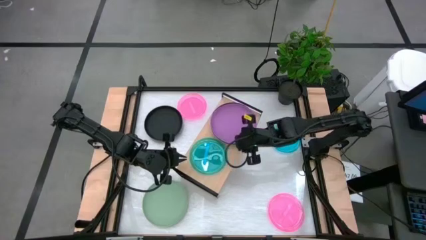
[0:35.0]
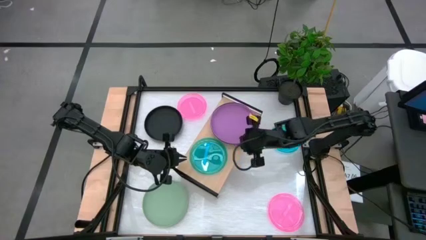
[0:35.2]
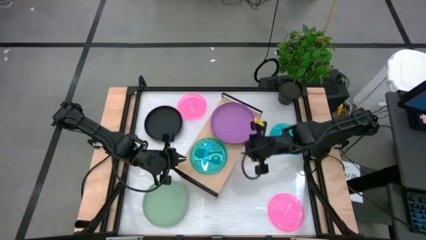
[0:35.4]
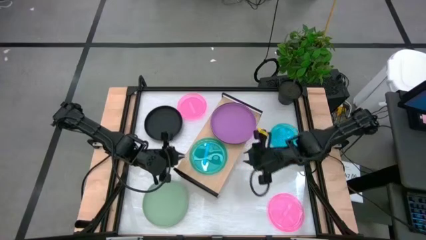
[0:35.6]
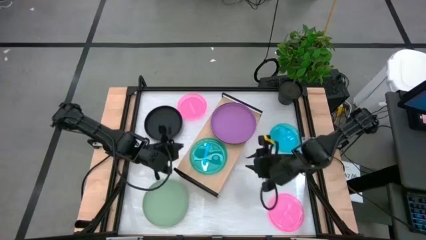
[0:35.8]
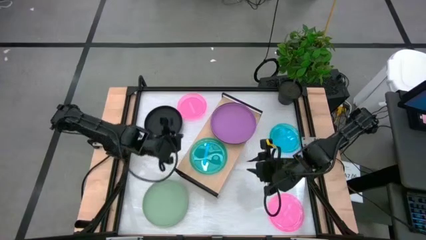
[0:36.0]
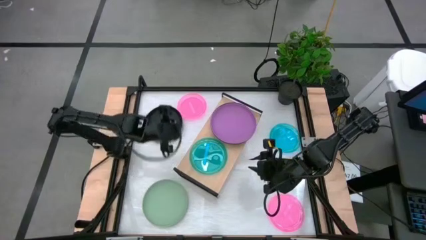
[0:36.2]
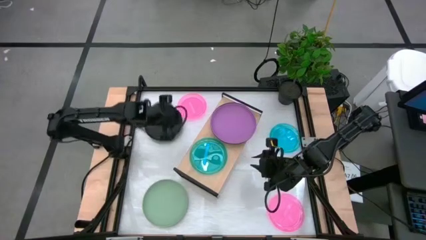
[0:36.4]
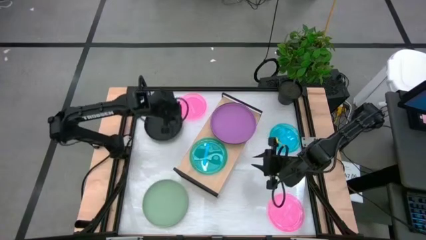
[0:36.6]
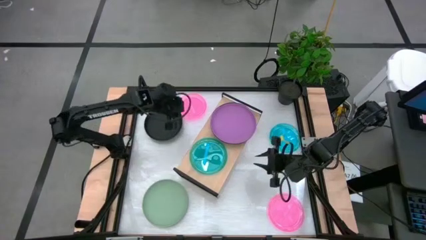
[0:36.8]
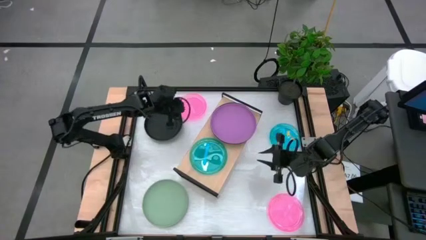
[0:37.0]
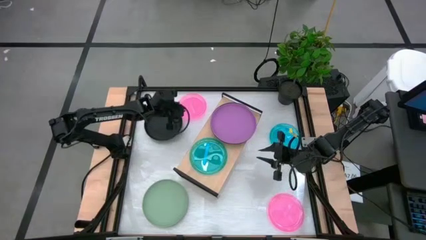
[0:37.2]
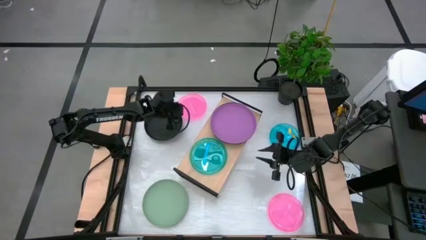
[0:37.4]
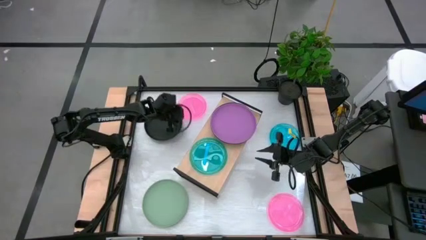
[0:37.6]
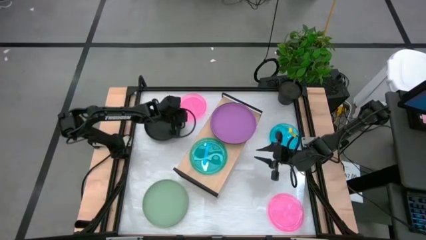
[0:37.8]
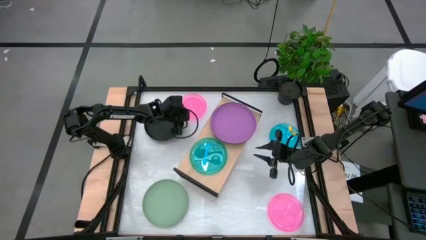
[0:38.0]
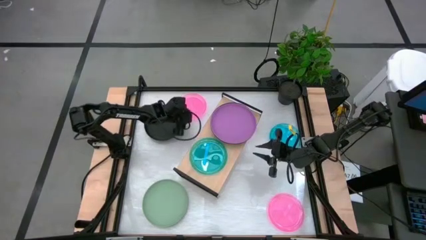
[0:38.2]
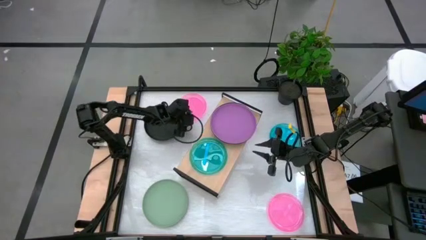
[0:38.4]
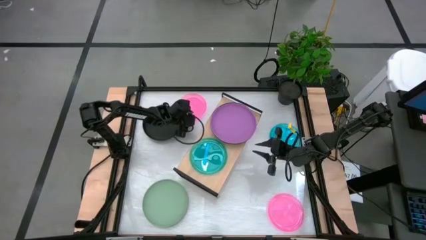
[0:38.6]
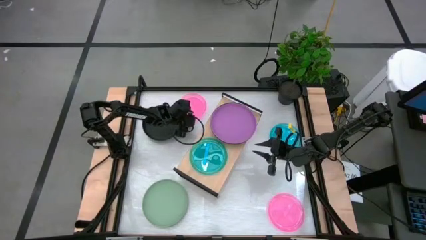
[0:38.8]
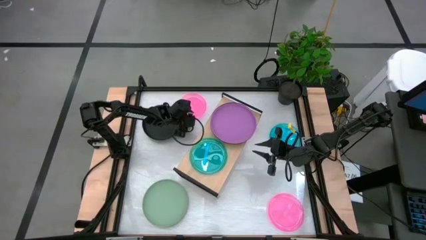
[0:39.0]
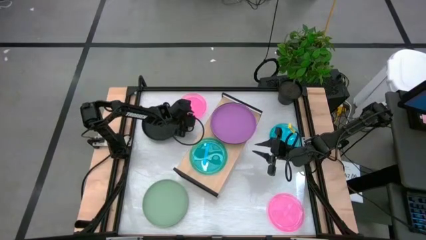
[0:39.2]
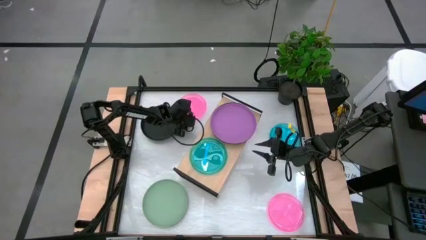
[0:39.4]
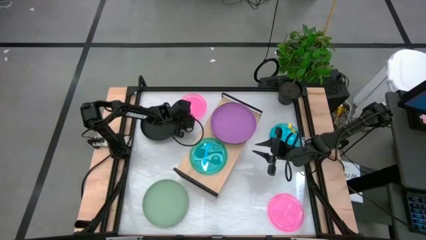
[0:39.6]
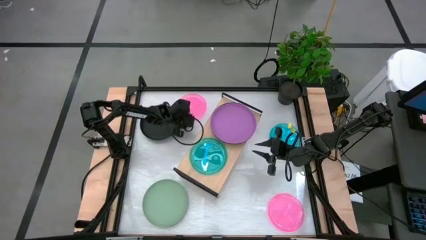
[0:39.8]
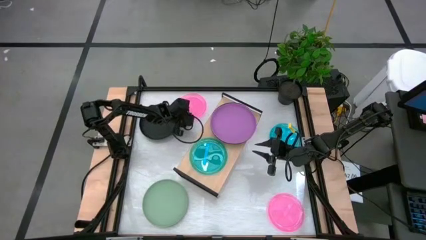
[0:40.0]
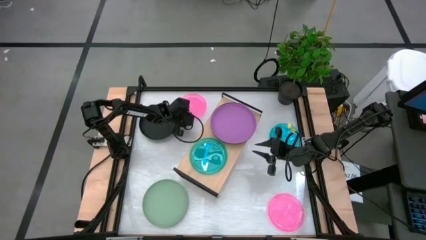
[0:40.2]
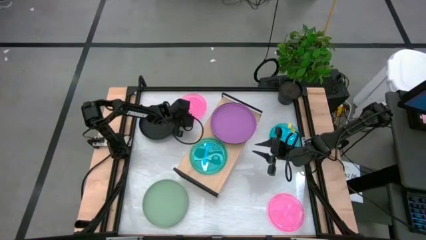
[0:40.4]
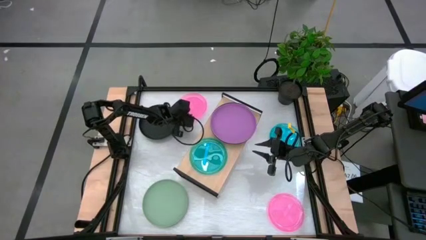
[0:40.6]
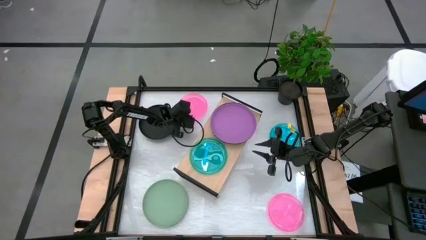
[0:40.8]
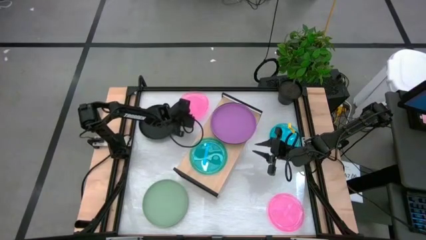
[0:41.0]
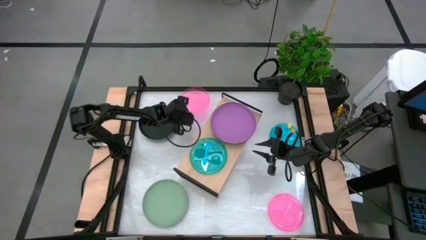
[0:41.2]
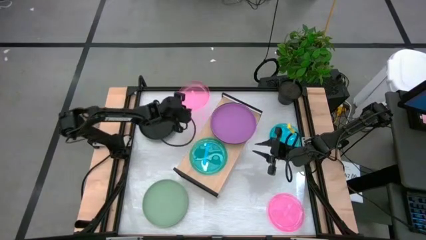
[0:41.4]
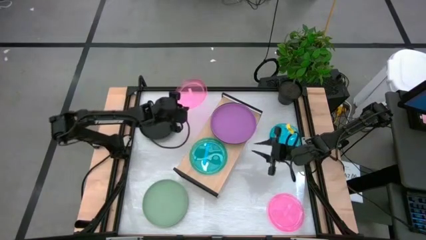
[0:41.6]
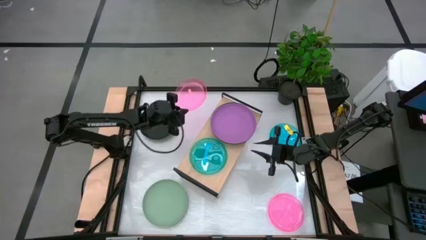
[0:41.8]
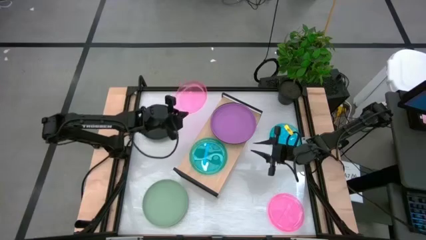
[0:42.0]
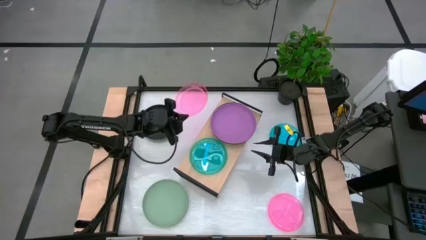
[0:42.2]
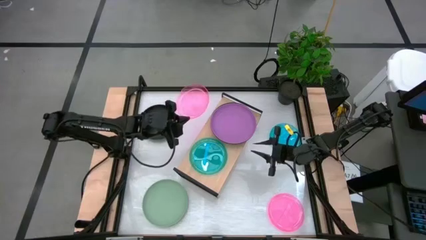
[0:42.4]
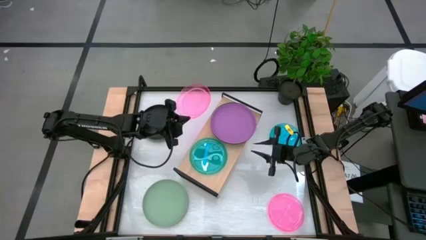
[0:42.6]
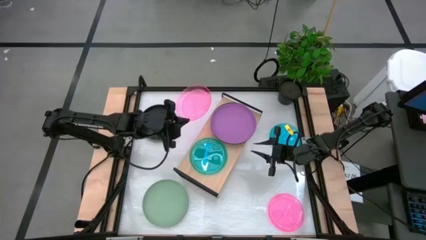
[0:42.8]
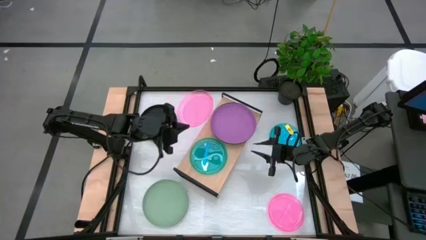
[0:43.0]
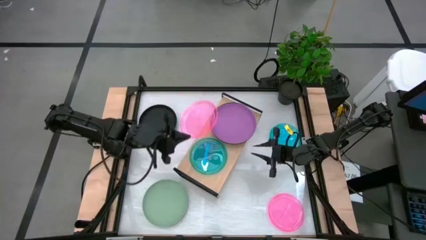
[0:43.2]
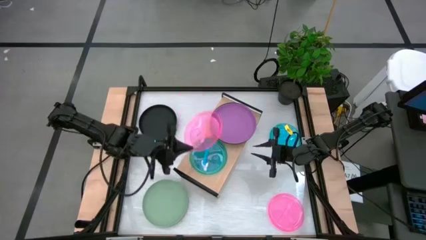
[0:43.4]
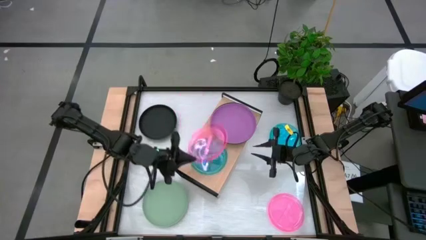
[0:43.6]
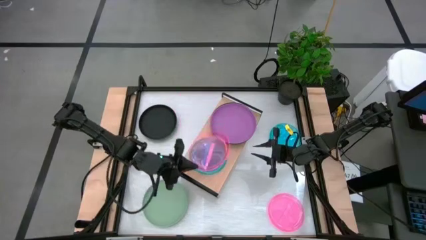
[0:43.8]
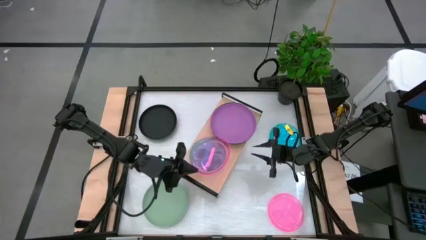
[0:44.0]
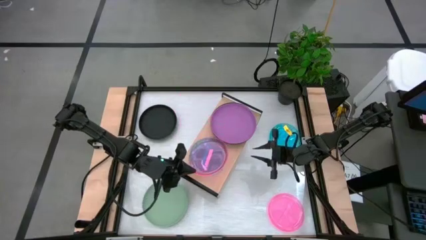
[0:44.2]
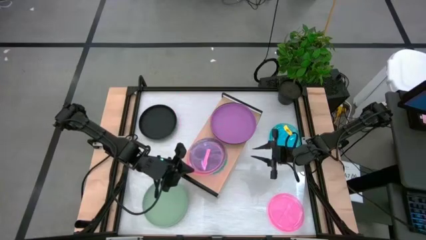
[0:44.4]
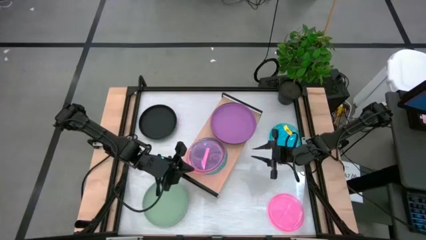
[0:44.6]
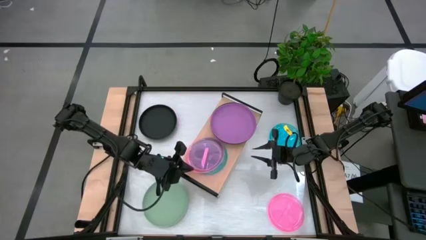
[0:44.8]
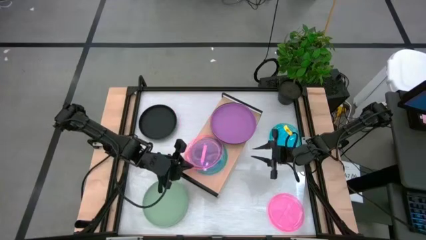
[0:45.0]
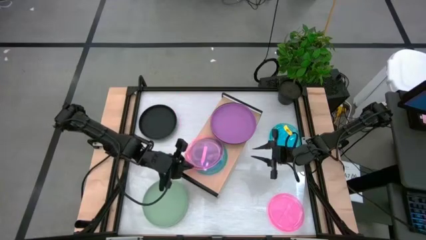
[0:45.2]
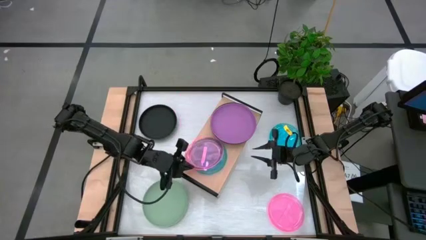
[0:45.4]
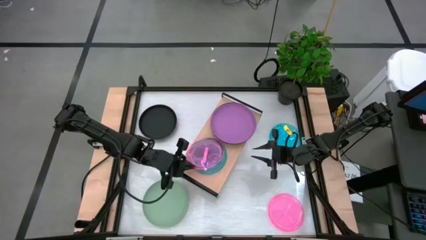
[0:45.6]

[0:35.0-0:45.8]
Task: Place and stack plates onto a shelf
Stack the small transparent pink plate on top of the small transparent transparent blue plate

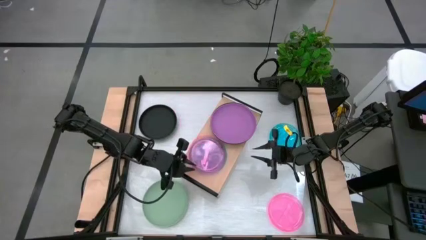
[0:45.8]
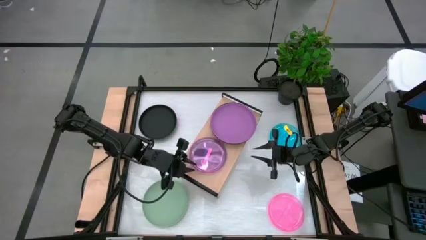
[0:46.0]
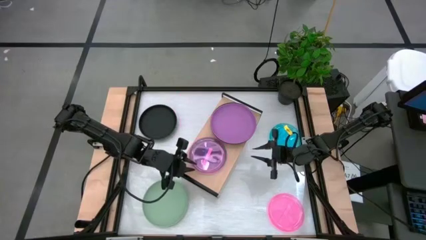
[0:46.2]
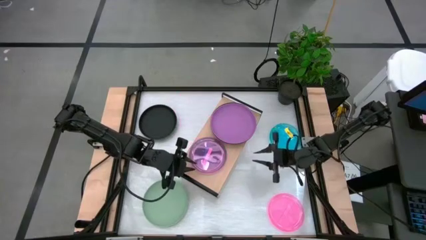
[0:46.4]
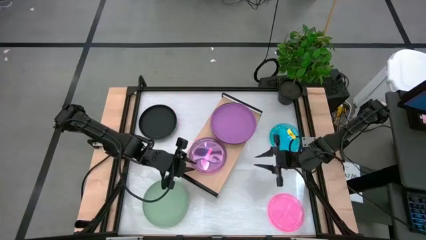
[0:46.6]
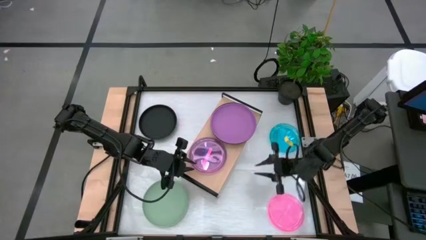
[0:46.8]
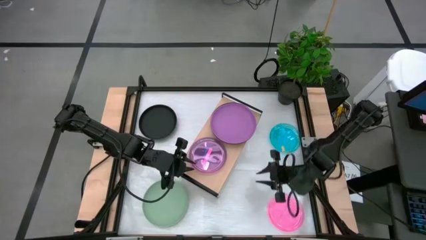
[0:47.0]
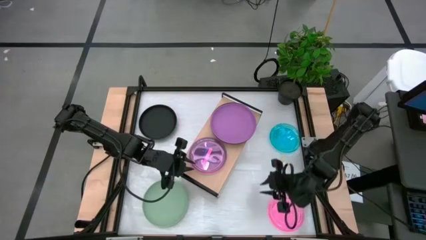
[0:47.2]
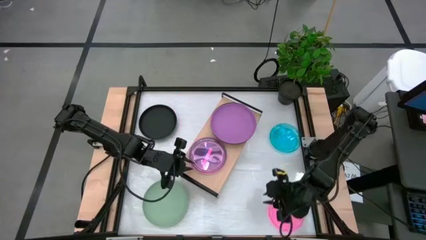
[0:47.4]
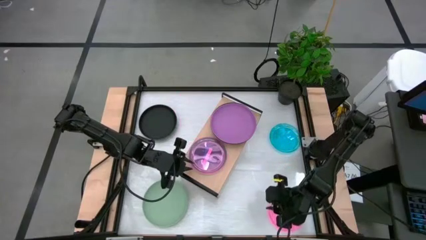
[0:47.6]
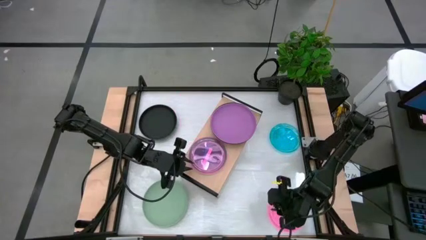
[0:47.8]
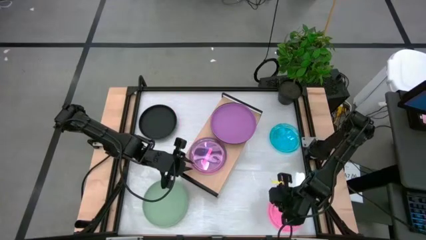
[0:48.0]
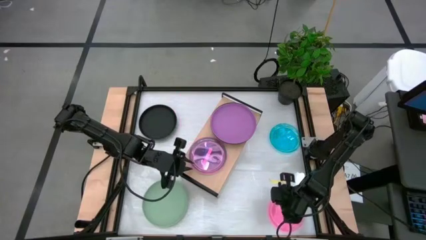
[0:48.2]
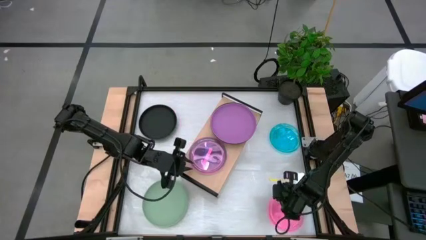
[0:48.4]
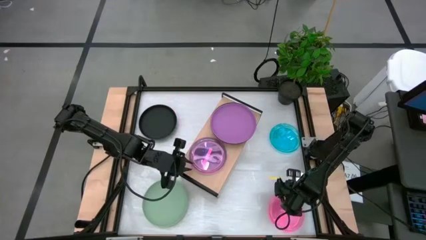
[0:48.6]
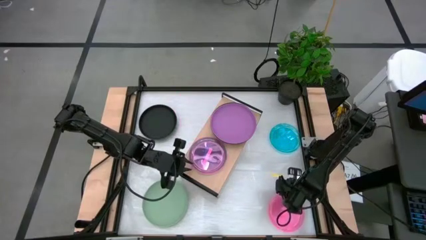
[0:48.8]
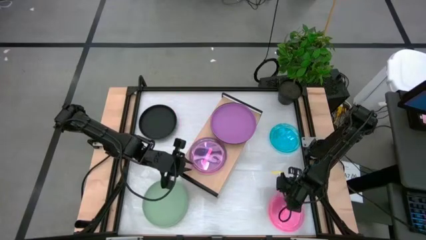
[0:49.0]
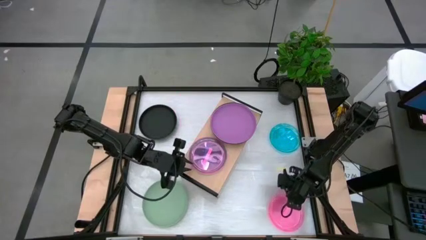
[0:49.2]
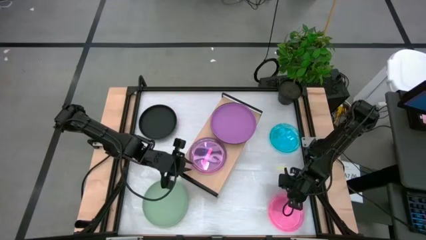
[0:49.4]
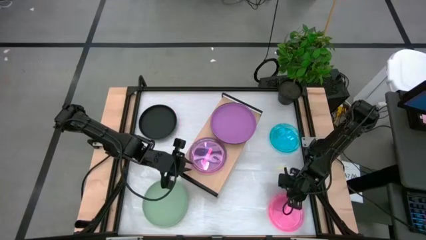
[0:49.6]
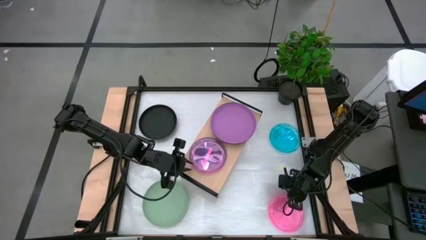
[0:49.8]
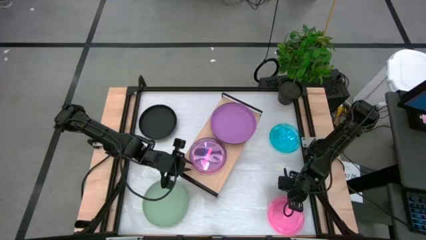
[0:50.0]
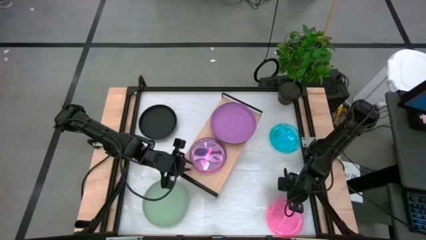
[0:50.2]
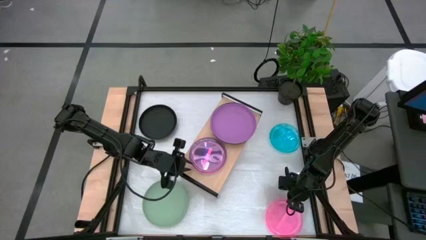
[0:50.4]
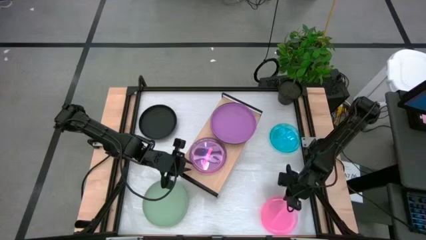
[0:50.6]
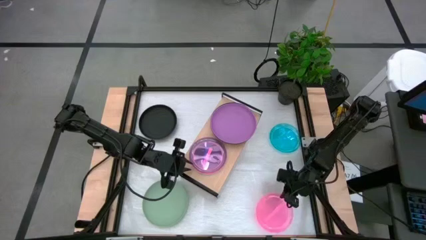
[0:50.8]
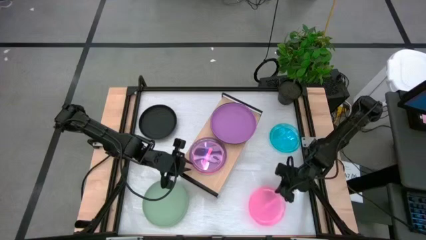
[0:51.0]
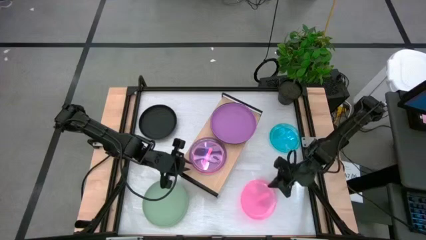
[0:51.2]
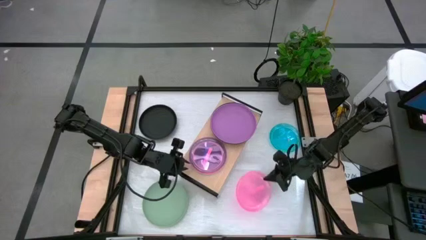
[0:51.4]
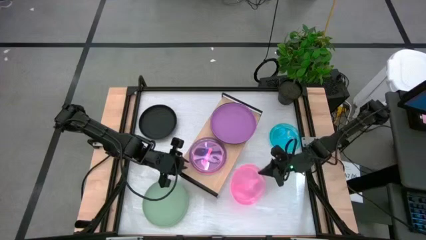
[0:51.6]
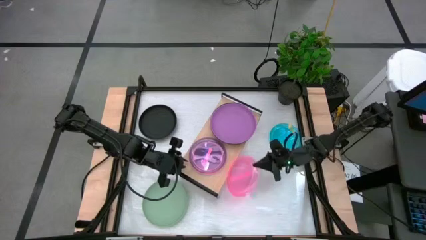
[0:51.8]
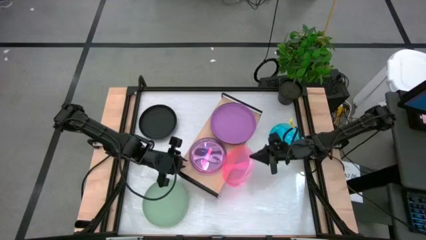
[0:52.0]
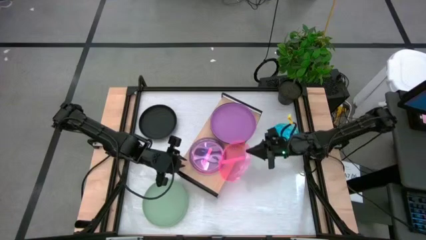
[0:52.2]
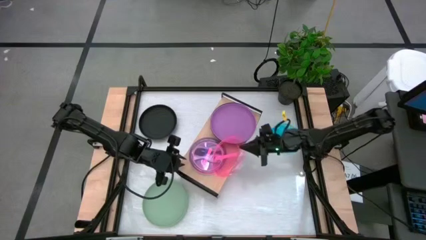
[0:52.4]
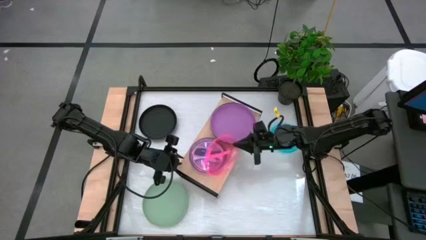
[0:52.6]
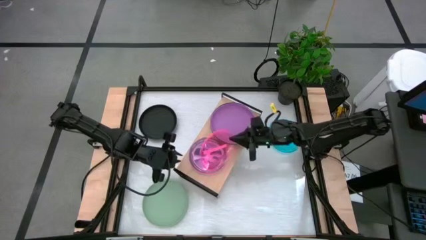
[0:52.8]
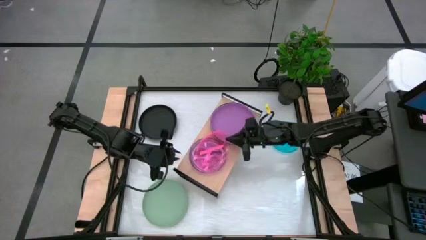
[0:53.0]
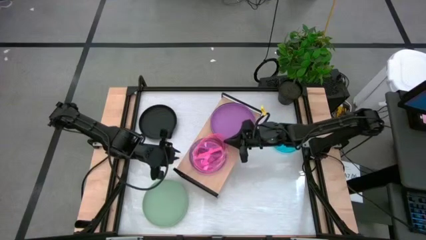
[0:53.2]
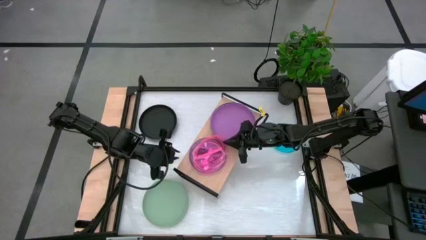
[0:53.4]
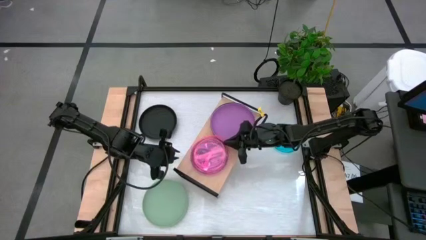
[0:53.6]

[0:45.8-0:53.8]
Stack the small transparent pink plate on top of the small transparent pink plate
